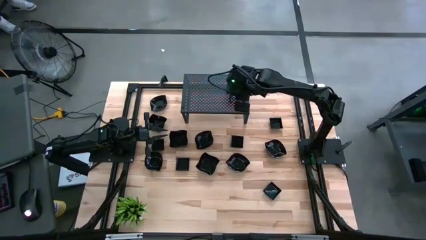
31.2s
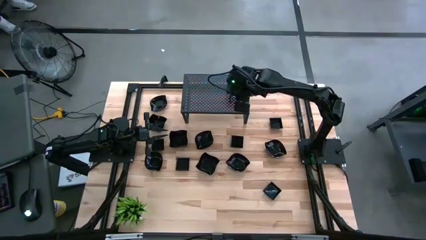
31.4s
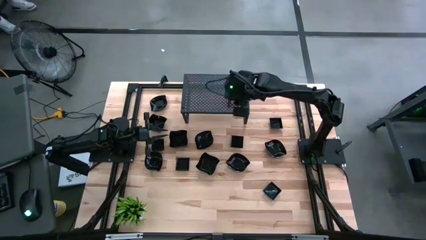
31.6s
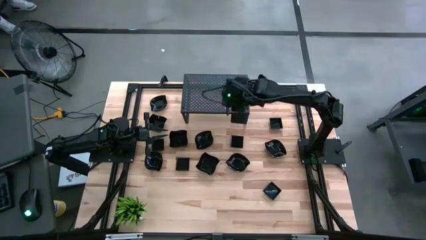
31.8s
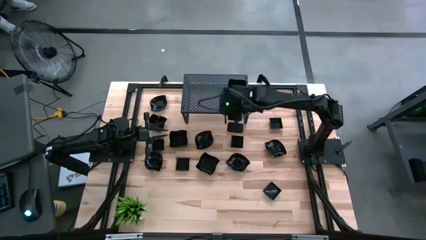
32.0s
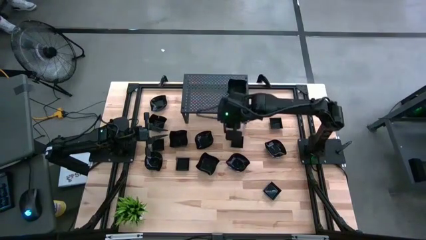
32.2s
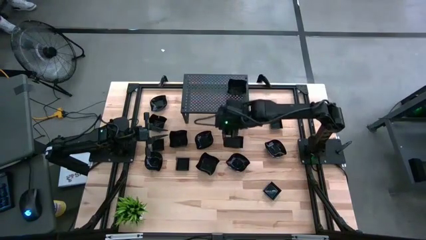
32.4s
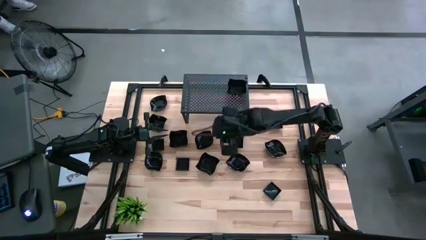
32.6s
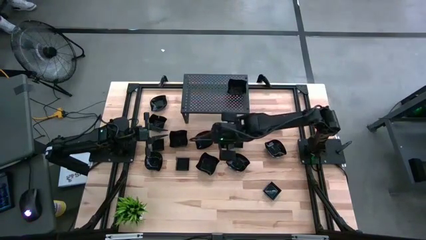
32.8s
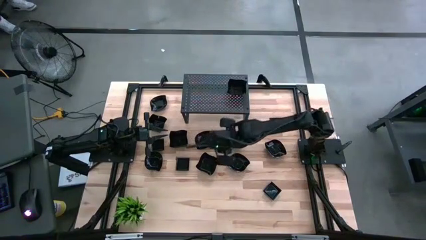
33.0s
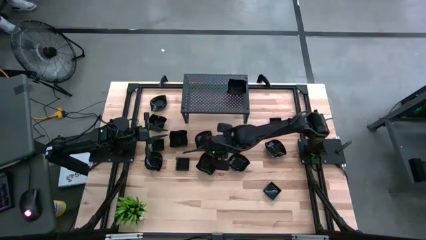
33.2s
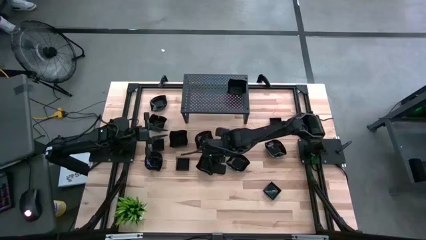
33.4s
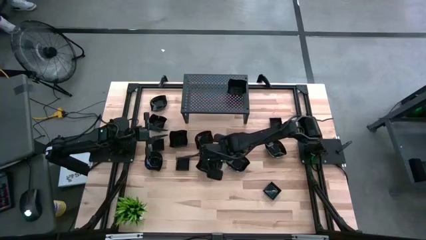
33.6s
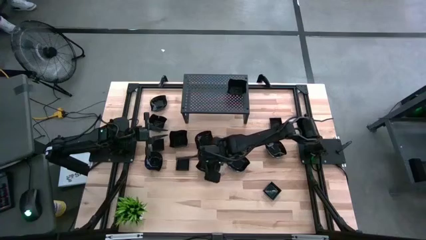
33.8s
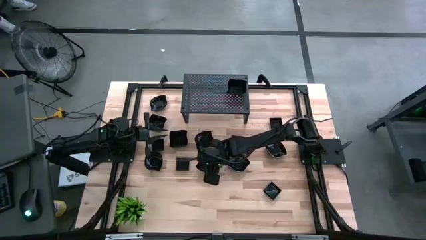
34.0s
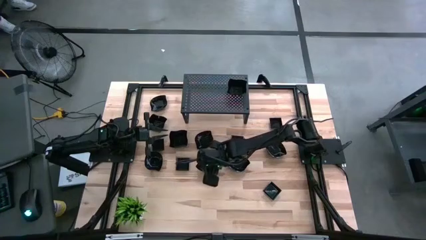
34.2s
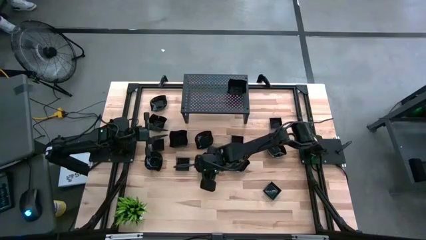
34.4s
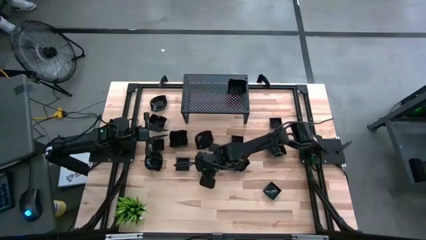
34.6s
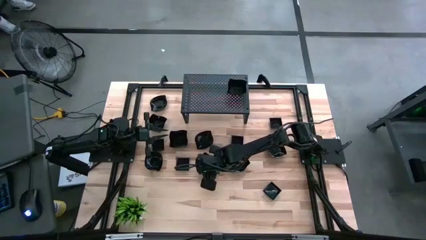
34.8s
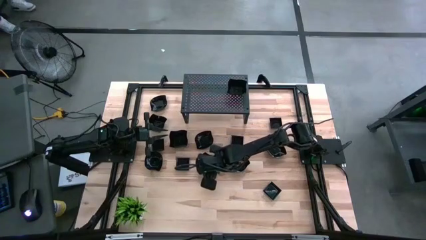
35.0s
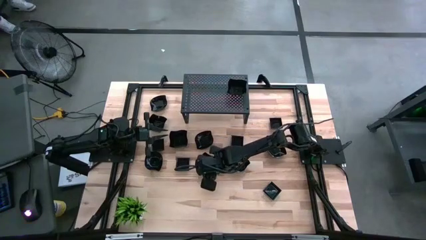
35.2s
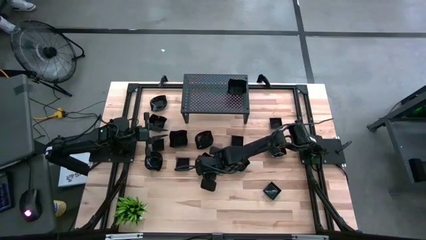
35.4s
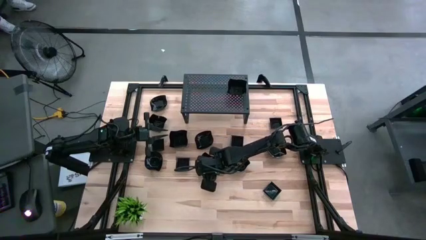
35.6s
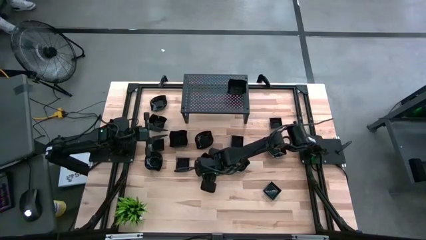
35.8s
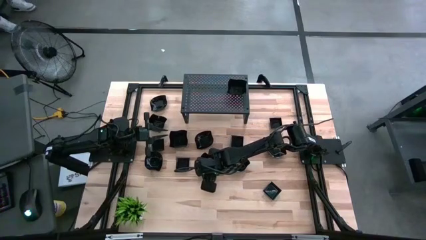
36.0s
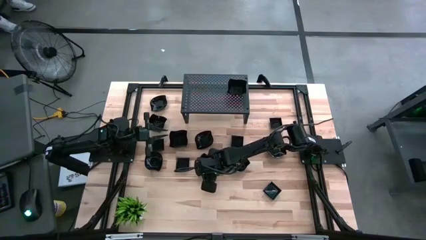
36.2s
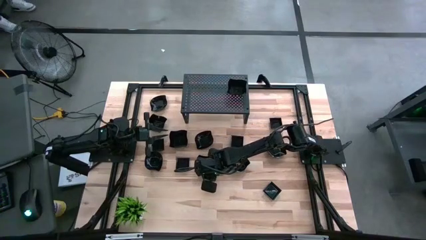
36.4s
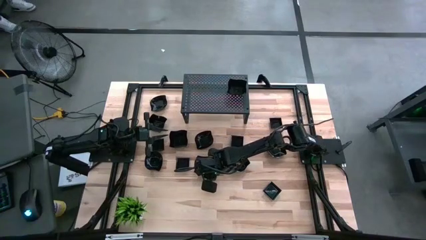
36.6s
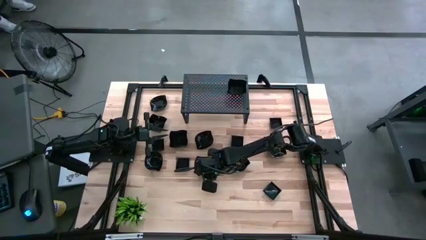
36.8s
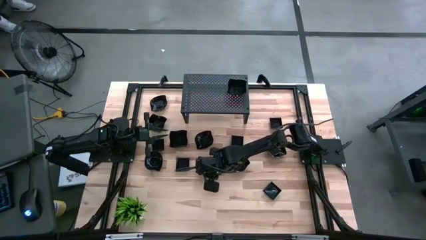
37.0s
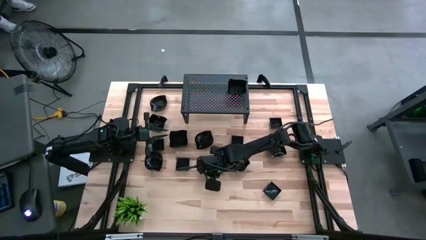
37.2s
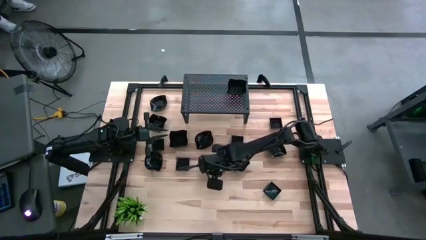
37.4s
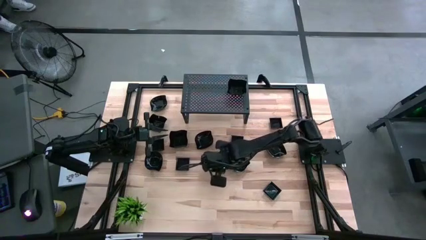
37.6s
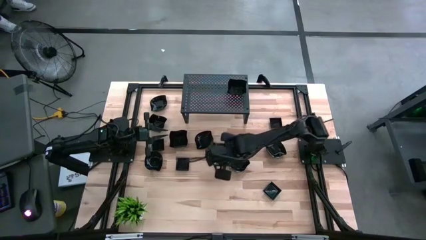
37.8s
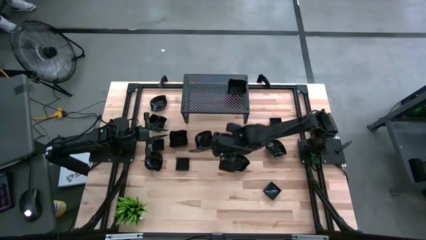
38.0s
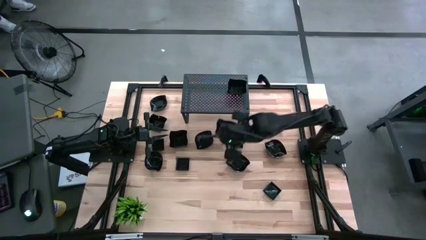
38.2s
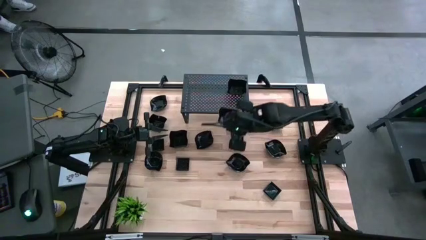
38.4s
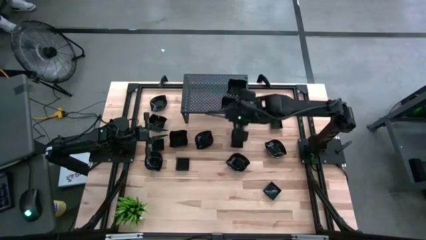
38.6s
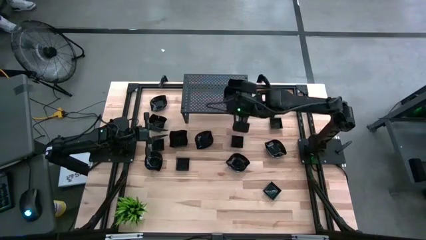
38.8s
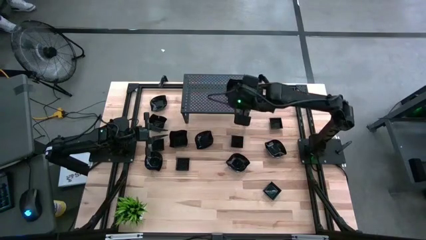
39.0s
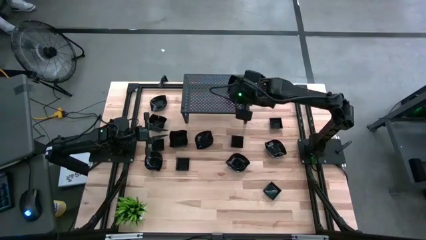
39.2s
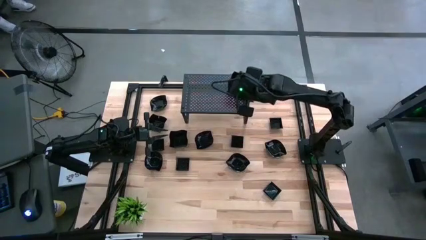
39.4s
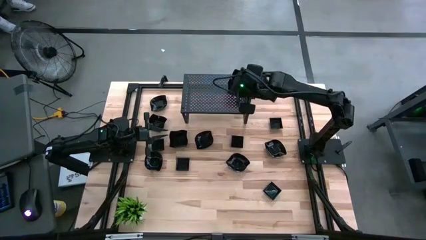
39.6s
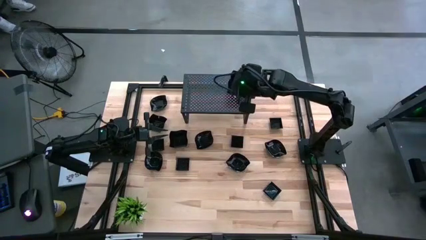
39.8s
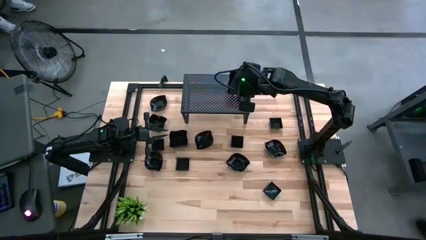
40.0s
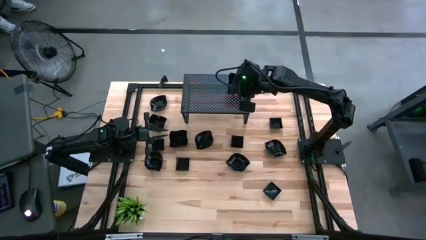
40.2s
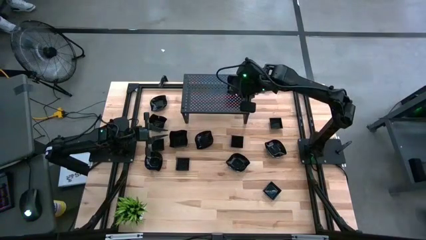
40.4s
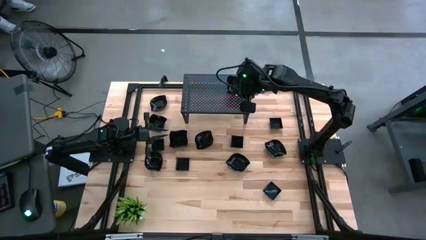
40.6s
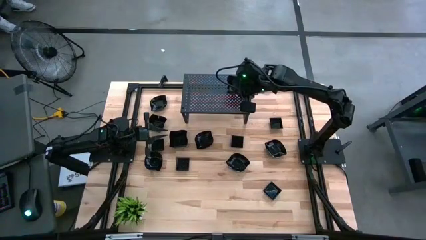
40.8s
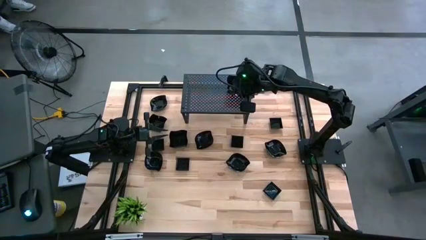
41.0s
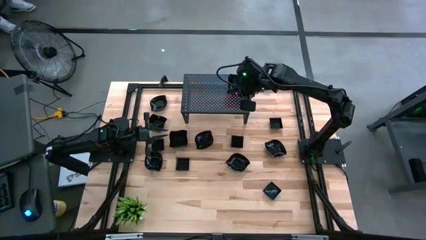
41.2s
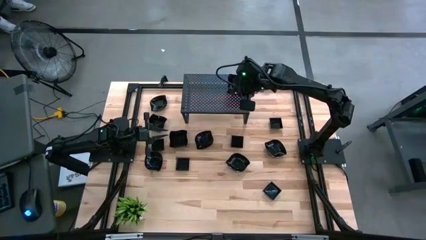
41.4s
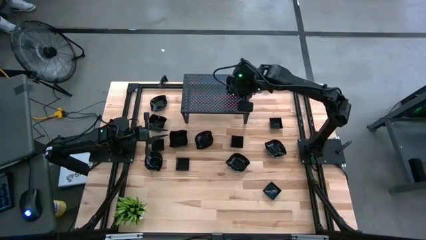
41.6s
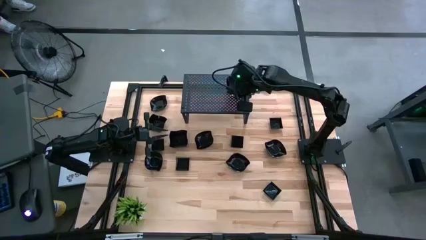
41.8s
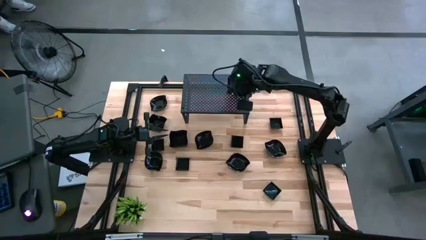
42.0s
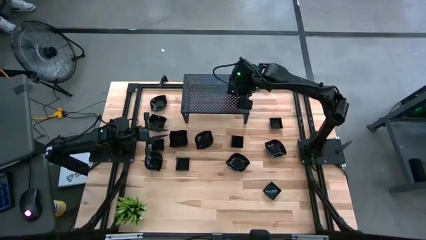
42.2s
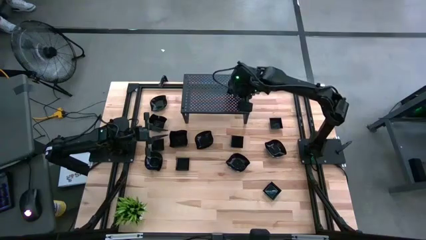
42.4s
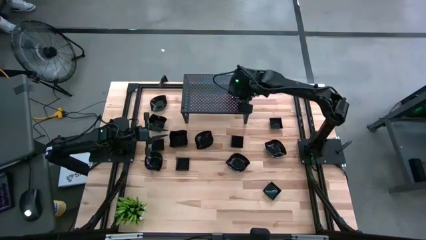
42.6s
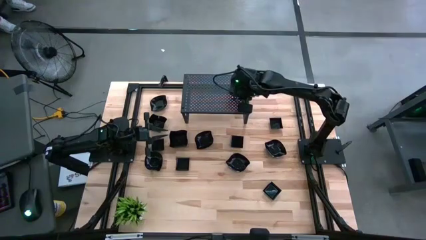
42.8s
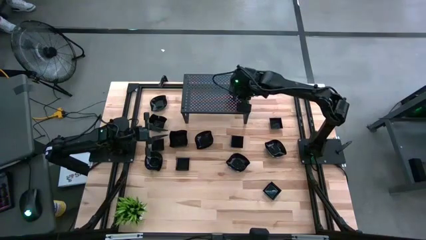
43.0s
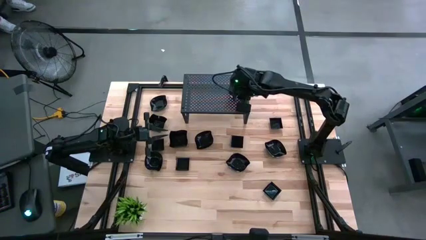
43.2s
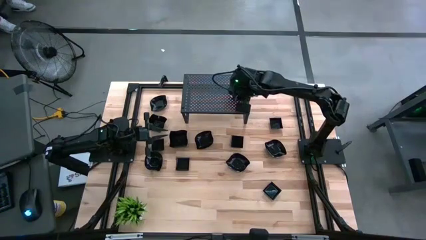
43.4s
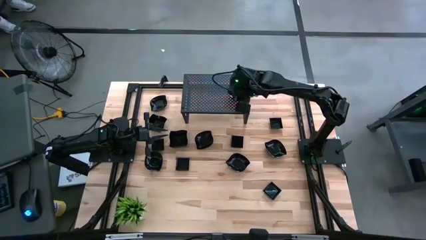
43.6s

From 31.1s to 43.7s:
Task: Pick & Place Mini shaped plates
Stack the black distorted square plate on top of the black distorted square plate on the shelf

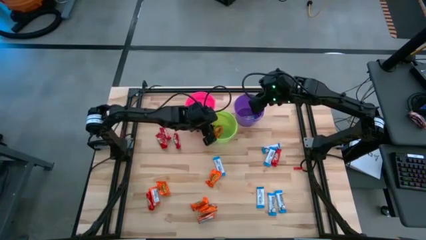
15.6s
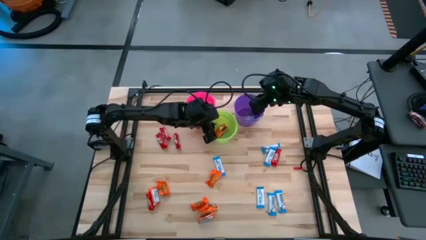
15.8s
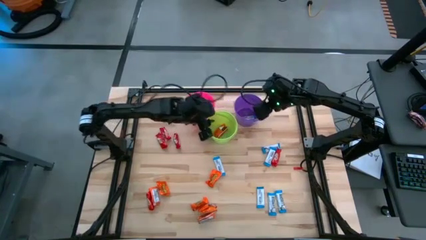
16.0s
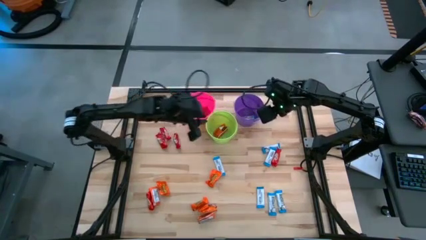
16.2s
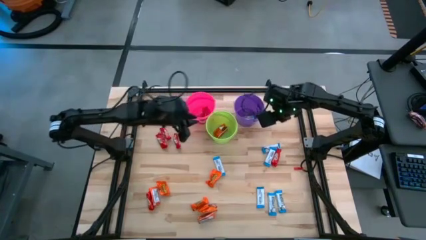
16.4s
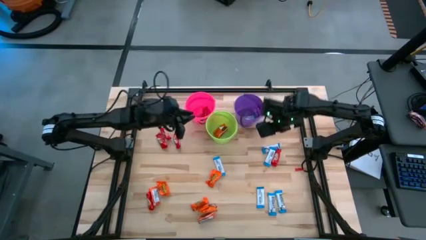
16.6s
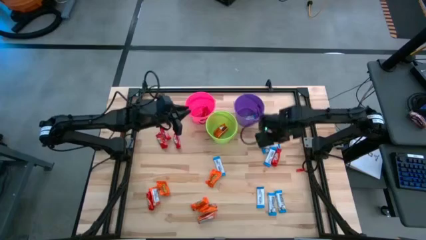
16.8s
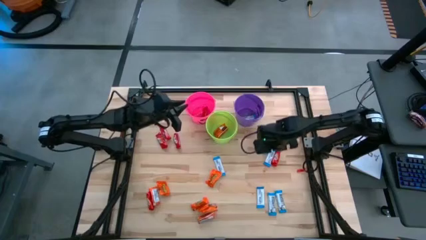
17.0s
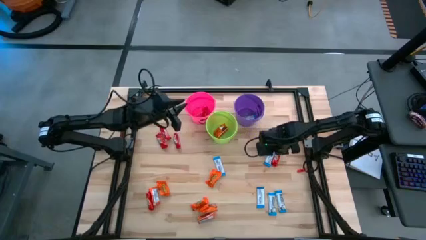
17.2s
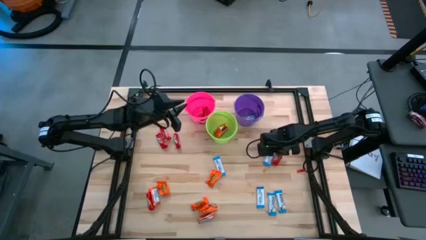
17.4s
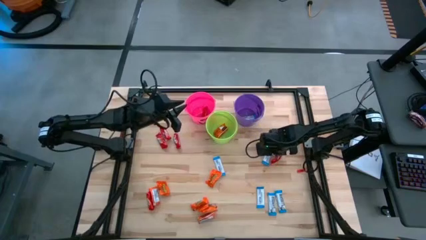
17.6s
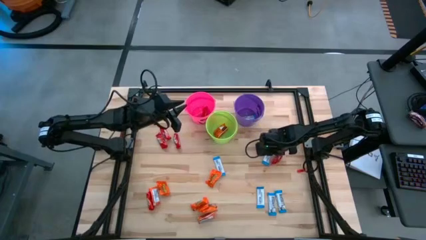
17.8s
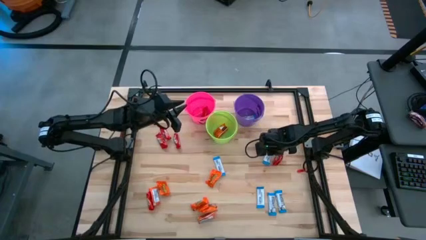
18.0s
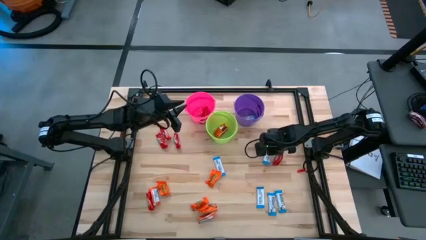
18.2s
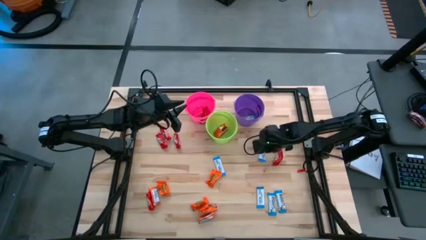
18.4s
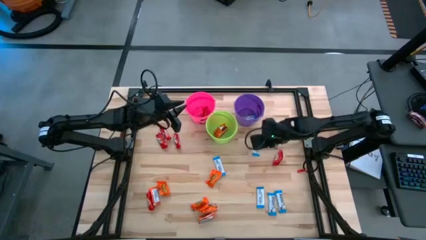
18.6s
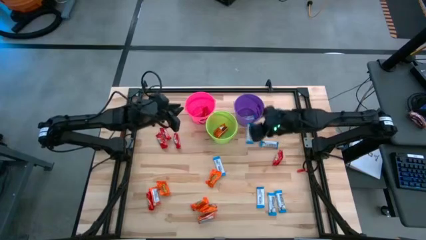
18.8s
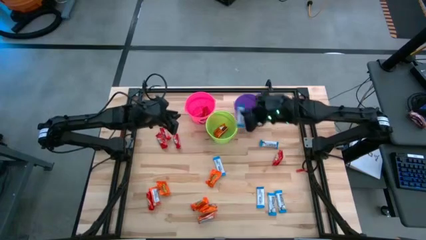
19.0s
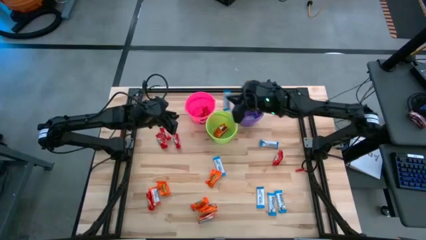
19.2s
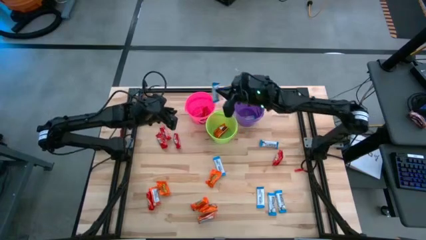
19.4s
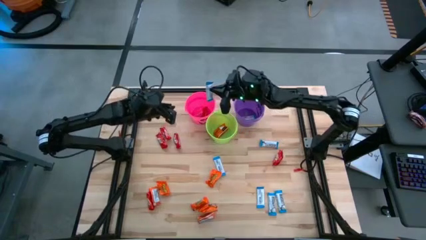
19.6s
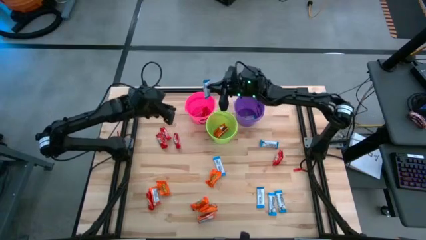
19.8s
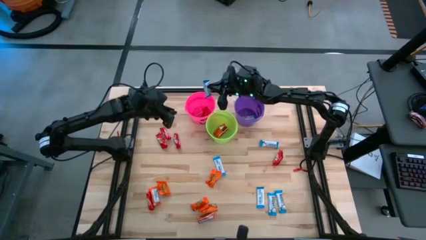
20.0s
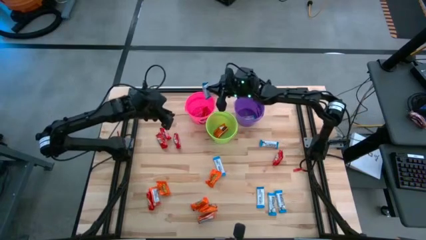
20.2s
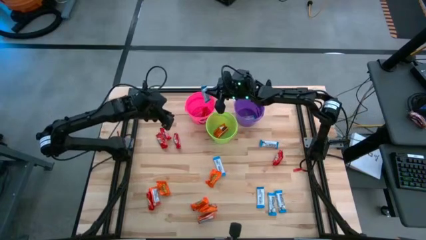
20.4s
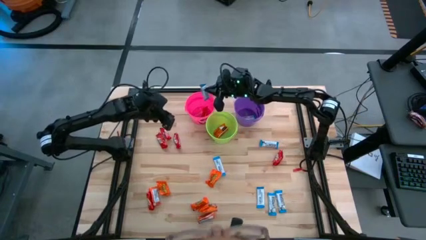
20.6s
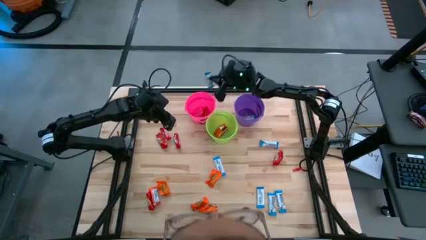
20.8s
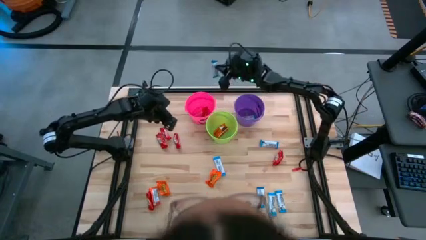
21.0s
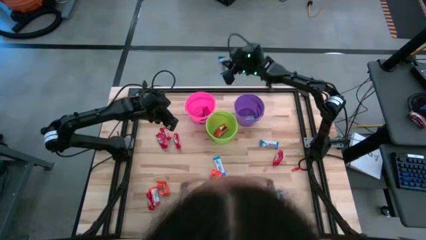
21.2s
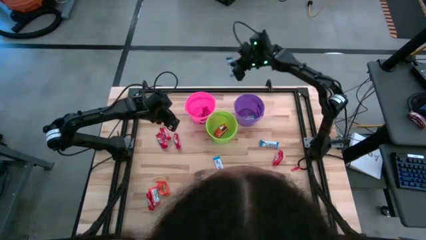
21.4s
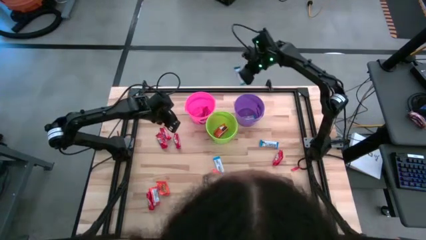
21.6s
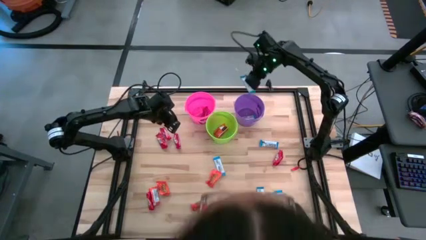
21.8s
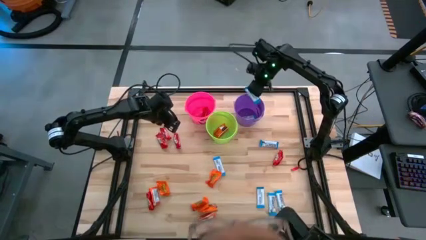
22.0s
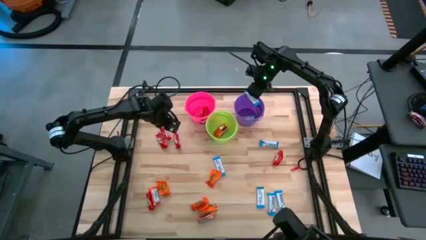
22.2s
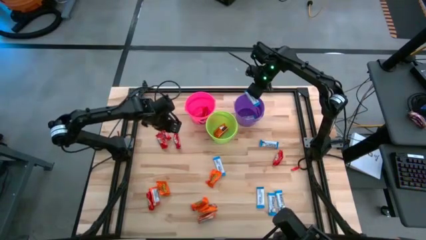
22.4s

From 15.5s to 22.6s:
Task: Sort candy
Put the blue candy into the violet bin
